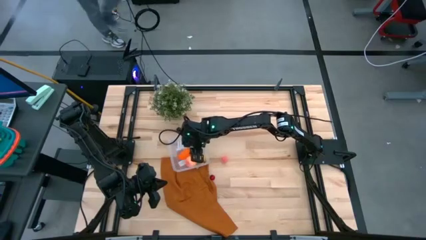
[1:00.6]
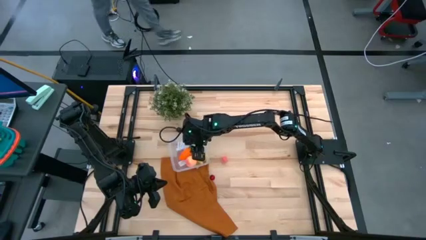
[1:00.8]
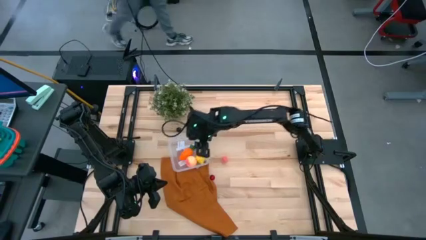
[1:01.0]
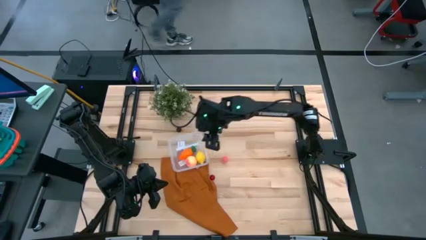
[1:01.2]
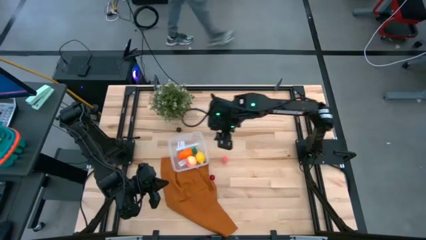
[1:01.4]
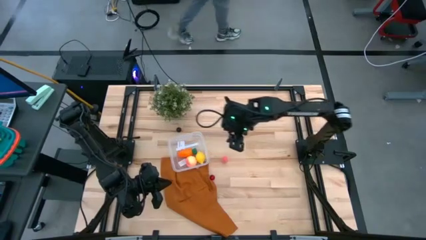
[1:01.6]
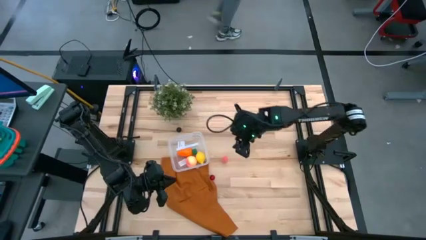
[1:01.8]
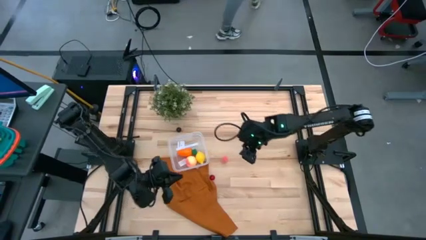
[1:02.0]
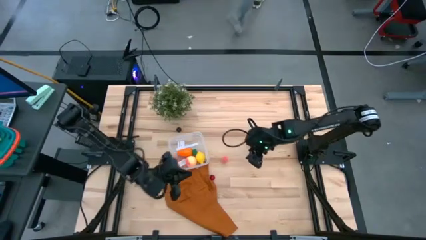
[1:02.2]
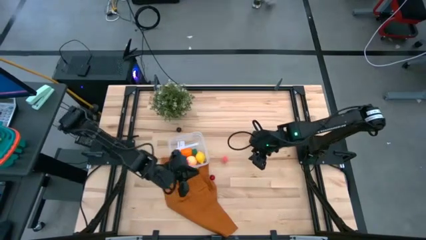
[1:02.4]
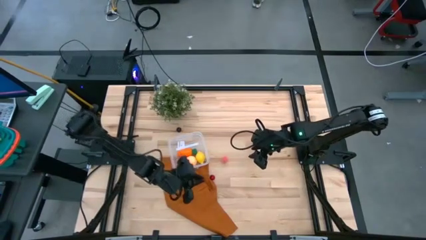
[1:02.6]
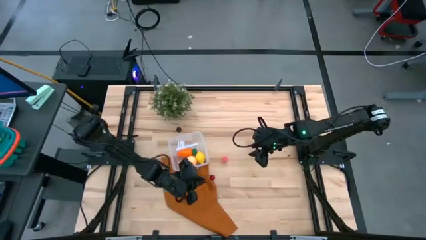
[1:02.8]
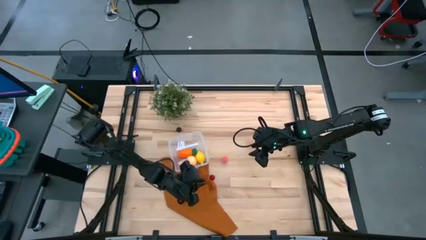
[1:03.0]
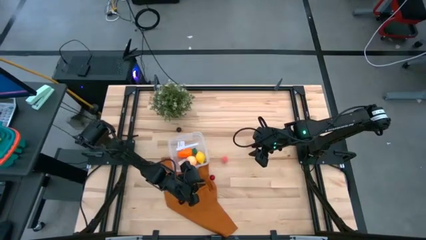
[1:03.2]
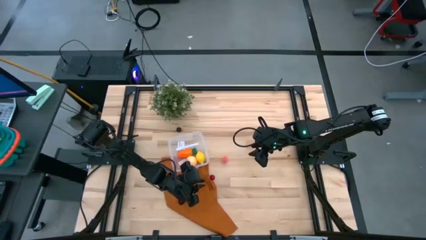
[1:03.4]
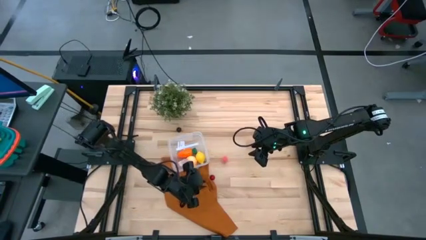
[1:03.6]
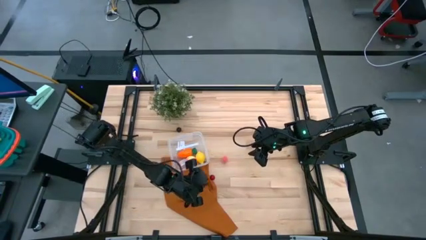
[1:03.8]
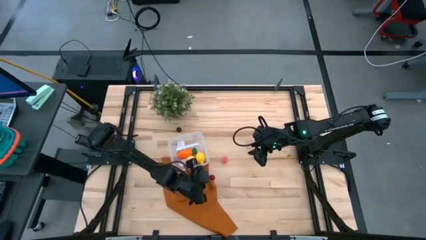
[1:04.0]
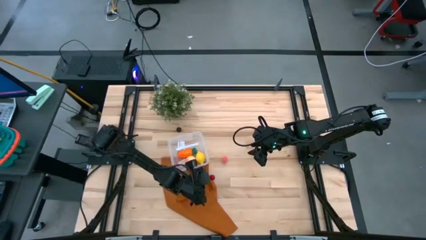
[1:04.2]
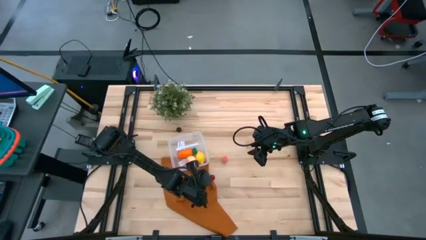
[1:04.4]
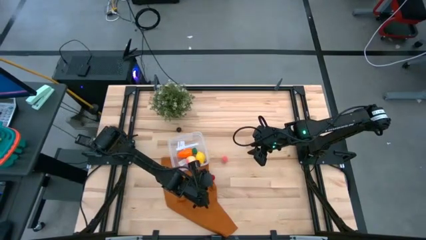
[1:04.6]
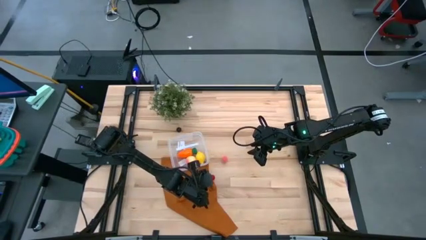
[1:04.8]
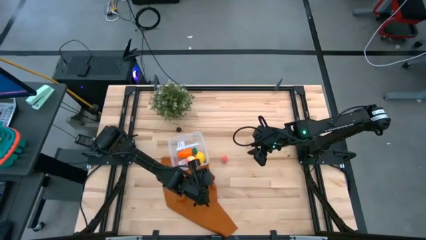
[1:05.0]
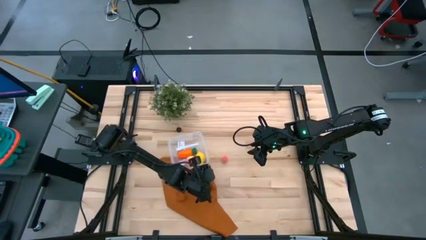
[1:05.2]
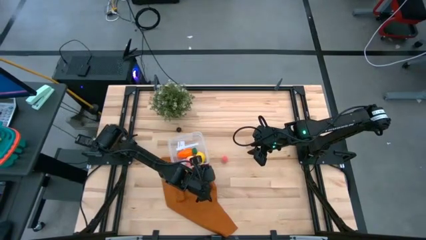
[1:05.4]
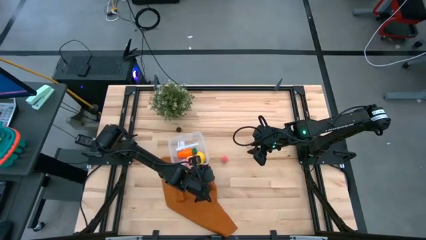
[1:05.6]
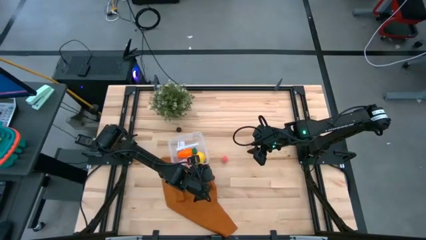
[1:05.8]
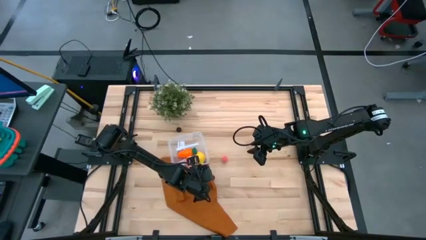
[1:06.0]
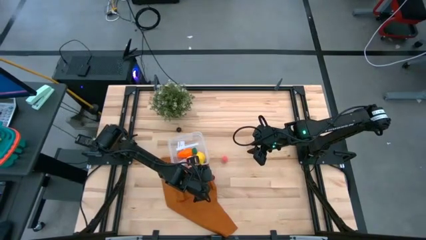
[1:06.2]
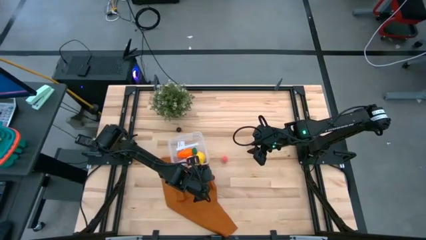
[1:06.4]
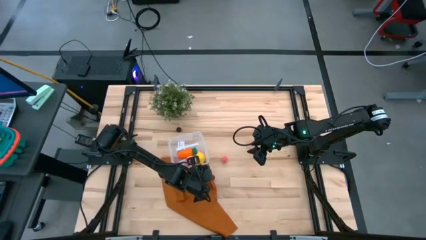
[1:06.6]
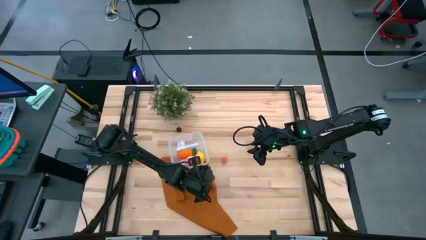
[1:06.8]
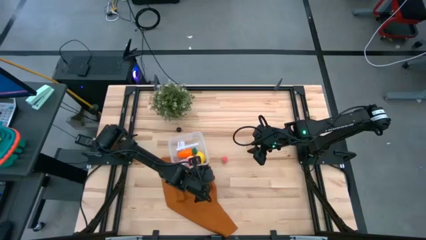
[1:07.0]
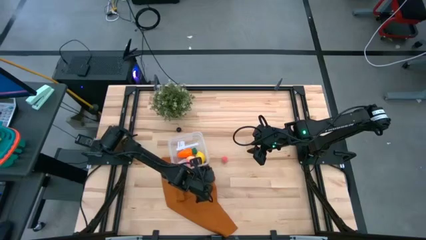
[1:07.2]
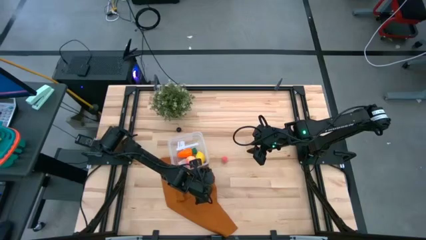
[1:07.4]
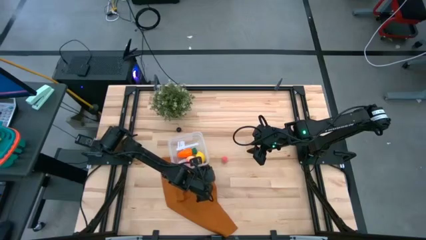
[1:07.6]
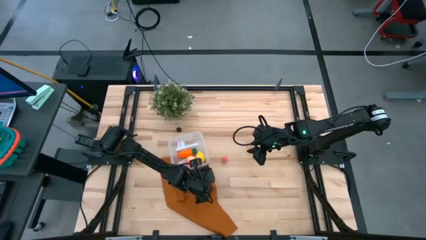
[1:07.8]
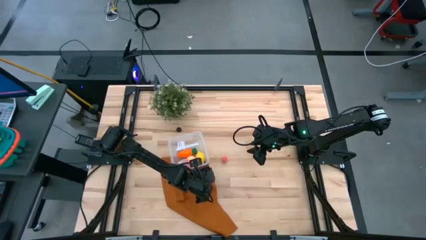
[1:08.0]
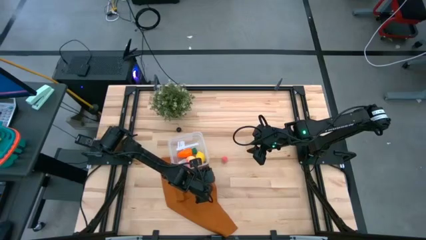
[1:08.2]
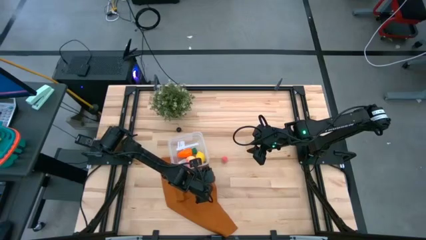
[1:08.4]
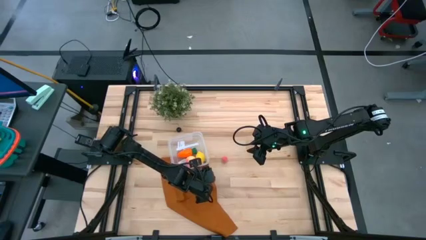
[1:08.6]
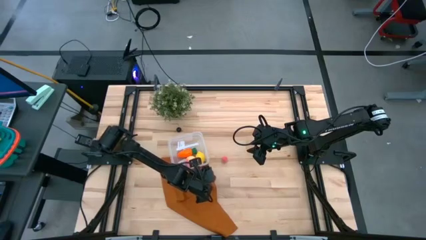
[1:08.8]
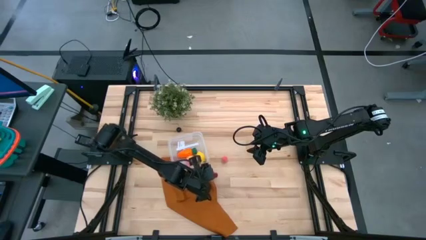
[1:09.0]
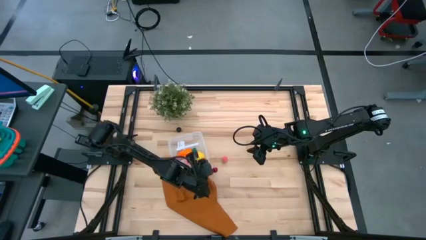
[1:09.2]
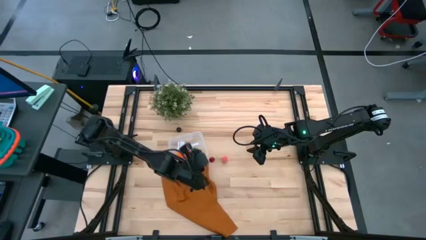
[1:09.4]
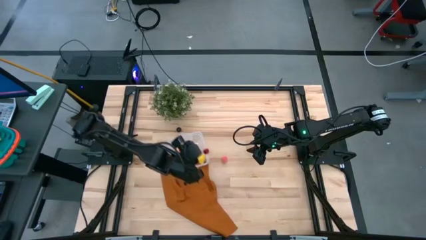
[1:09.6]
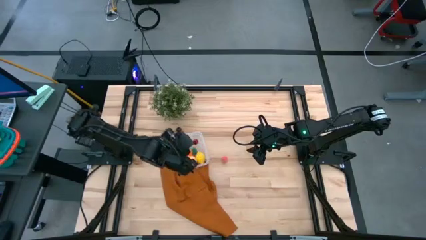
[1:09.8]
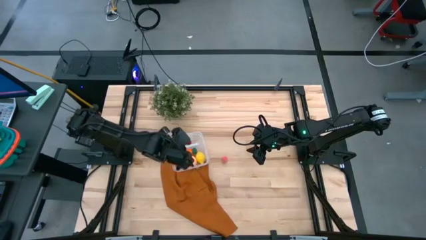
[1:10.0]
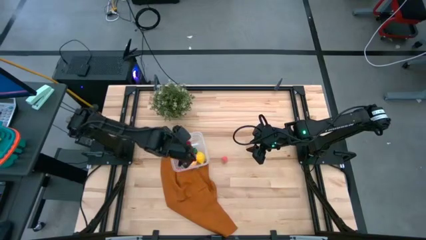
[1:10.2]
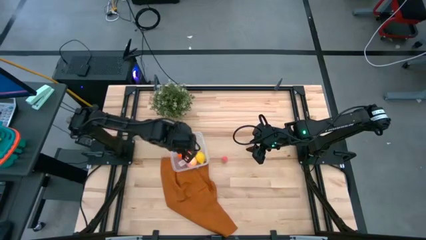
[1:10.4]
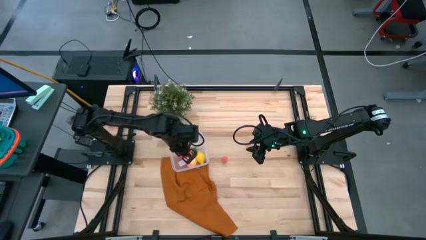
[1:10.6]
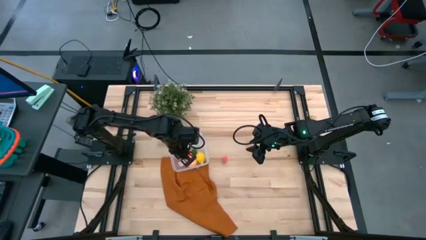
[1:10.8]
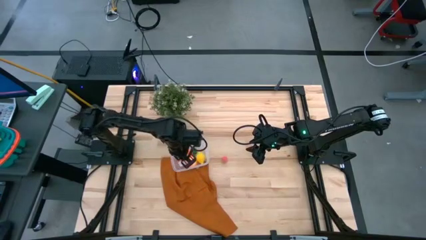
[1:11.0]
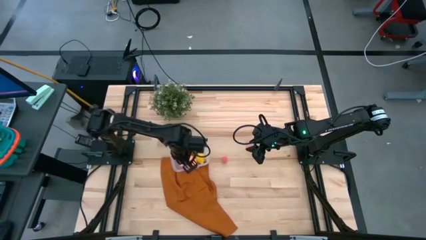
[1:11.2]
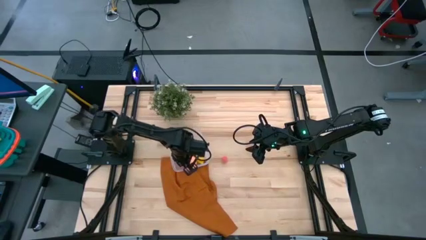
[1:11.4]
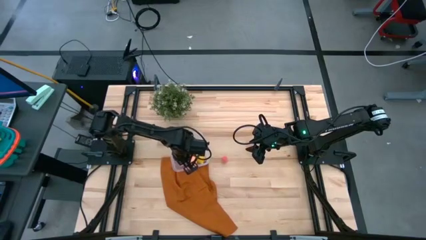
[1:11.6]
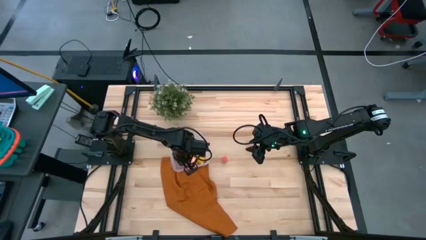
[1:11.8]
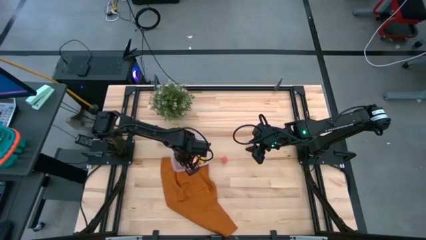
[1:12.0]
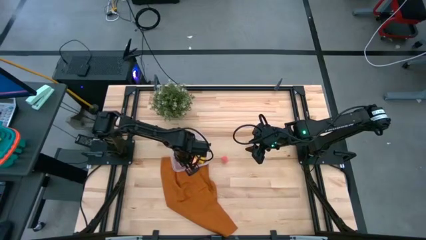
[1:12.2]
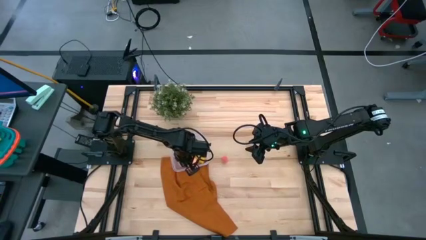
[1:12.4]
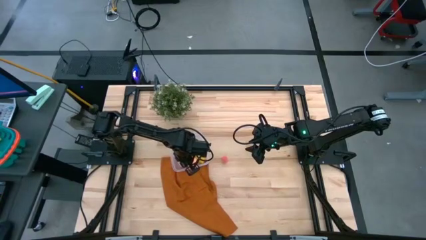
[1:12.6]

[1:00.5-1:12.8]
Task: Pick and placing Produce into tupperware
Put the red cherry into the bin

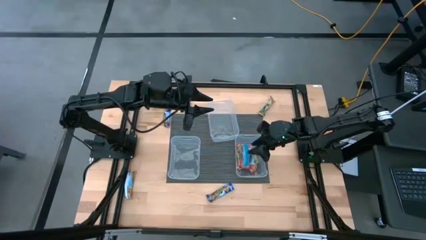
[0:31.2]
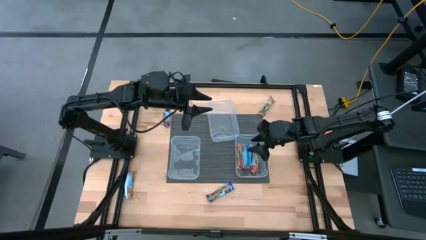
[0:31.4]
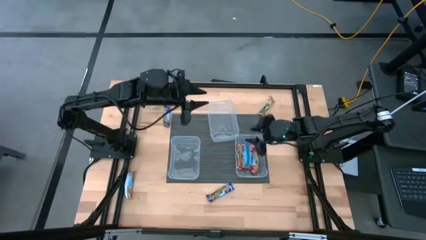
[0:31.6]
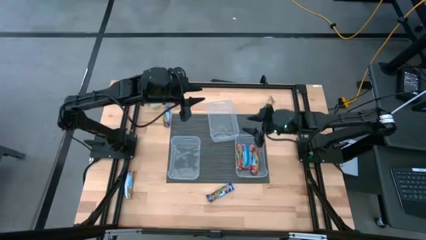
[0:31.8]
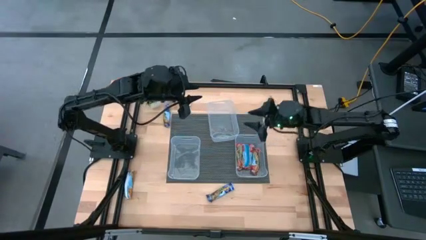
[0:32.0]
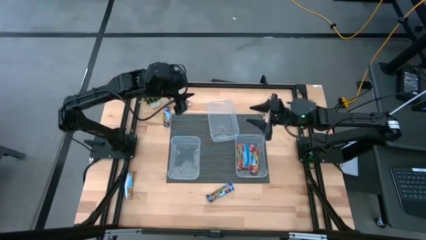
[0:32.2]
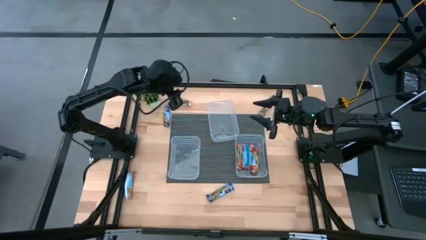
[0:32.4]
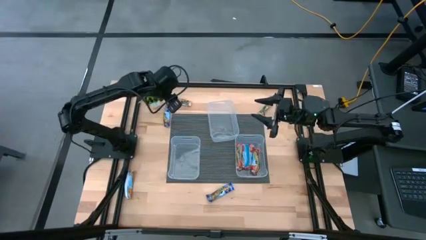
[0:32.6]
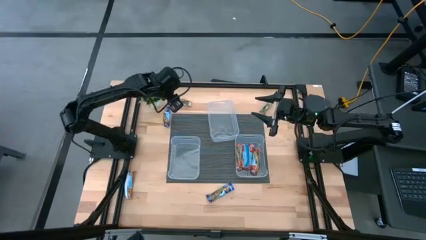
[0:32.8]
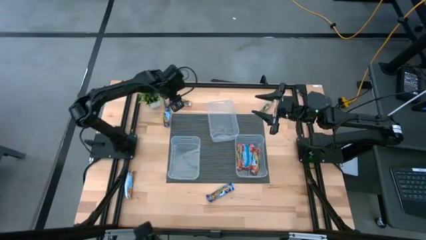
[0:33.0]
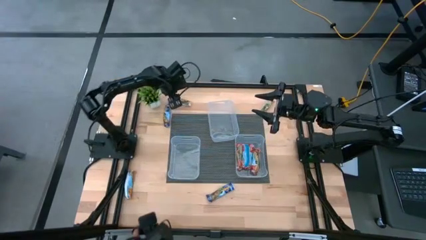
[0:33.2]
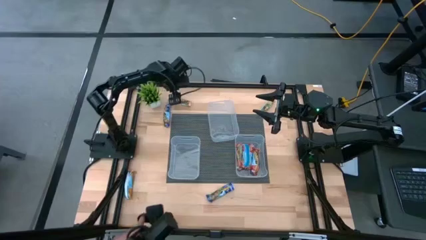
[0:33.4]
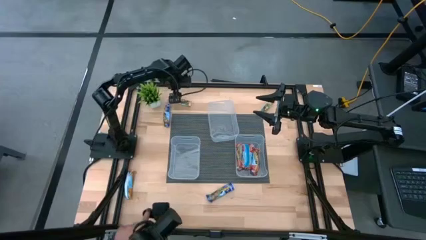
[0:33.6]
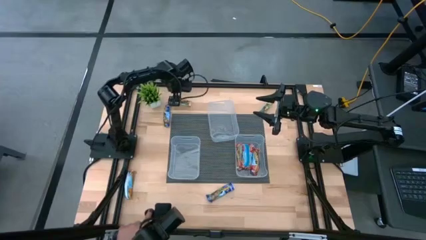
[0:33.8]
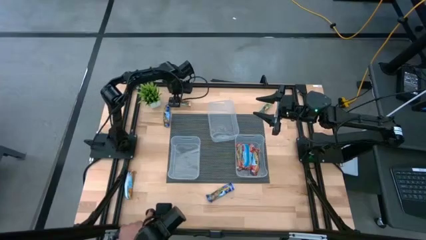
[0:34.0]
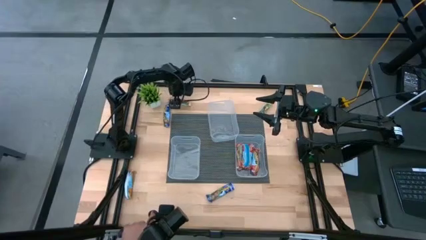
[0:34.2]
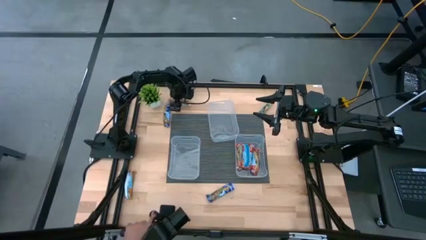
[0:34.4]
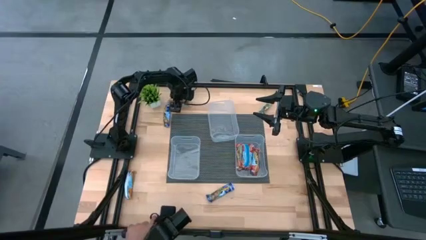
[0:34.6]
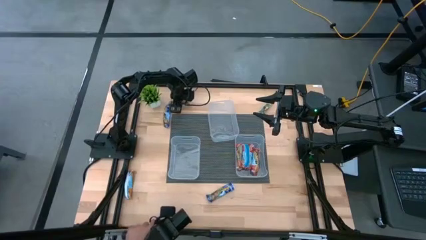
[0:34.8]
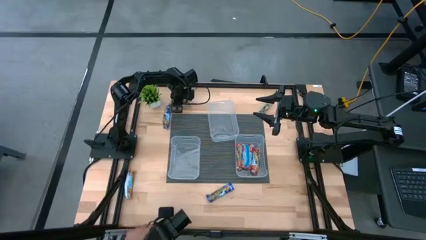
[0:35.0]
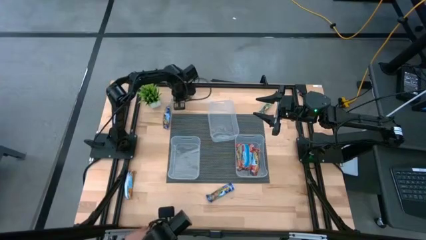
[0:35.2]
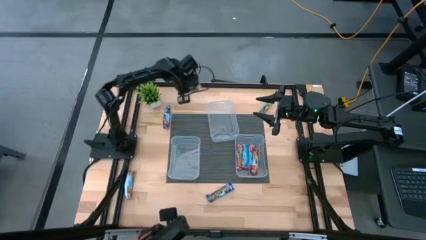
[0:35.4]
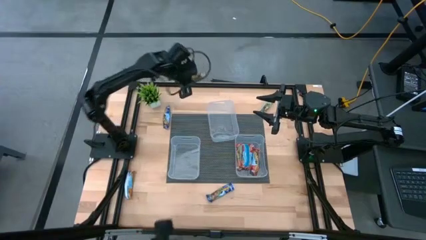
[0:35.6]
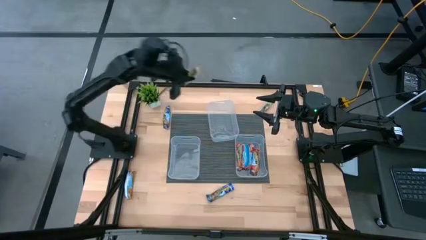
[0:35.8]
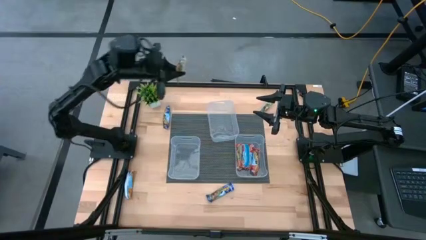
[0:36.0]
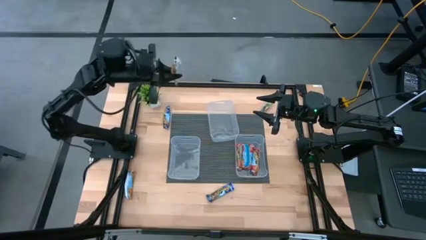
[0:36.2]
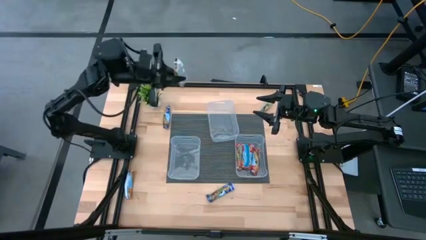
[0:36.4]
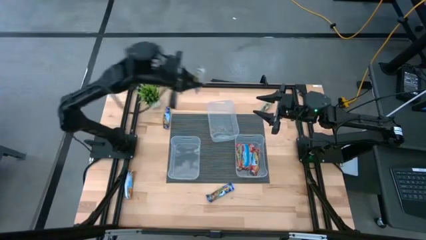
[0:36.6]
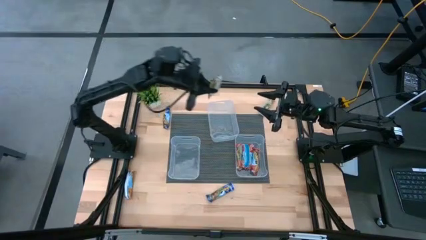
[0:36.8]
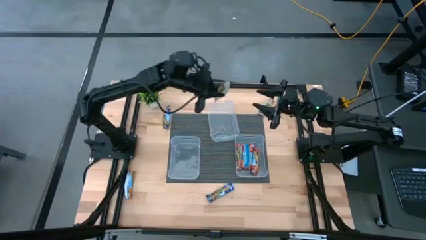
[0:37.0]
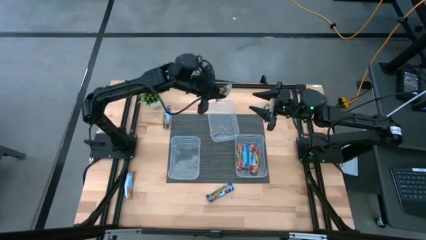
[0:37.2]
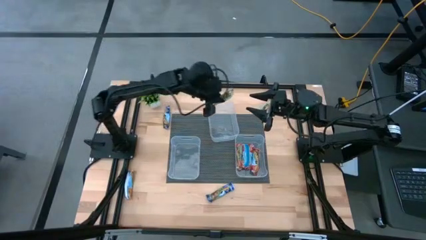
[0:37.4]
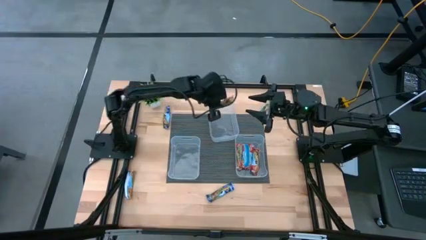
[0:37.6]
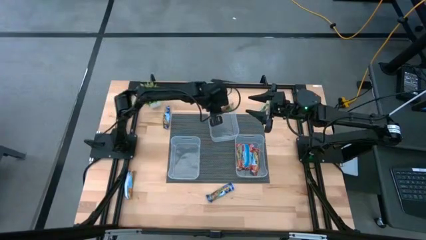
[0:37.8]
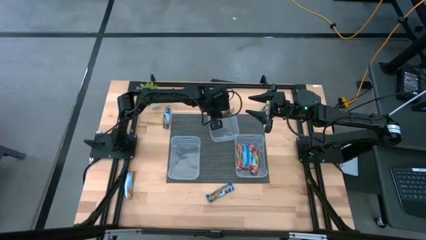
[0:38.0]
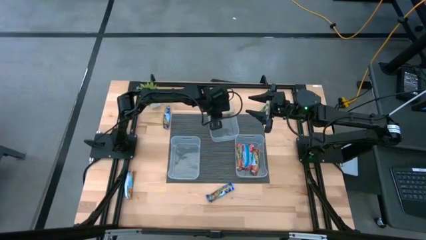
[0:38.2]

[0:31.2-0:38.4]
Task: Pick and place Granola Bars by type
Put the yellow granola bar into the top transparent bin
